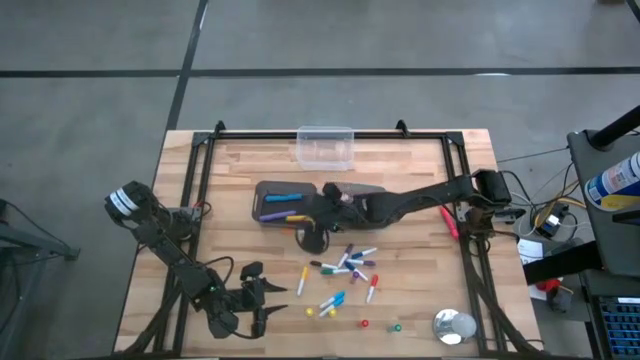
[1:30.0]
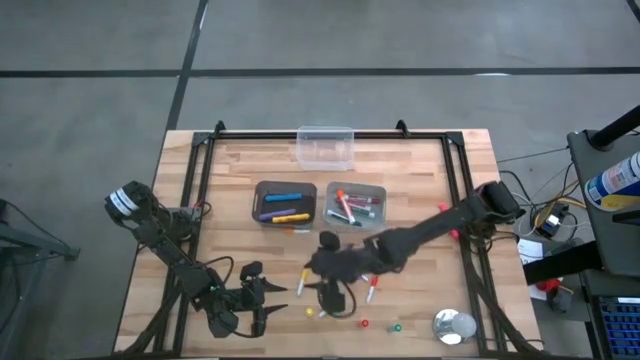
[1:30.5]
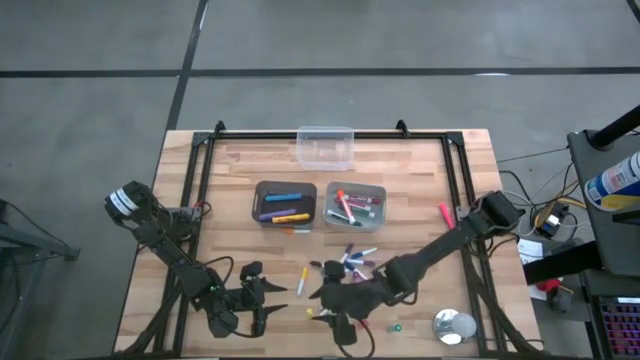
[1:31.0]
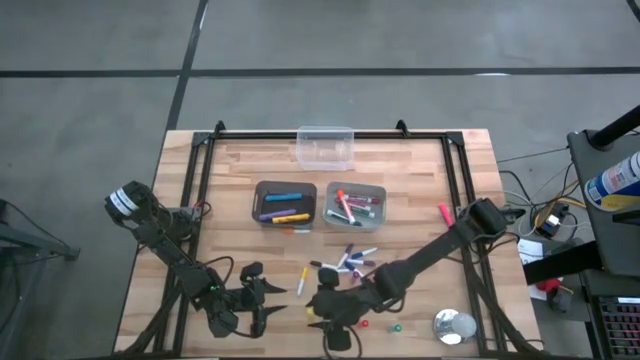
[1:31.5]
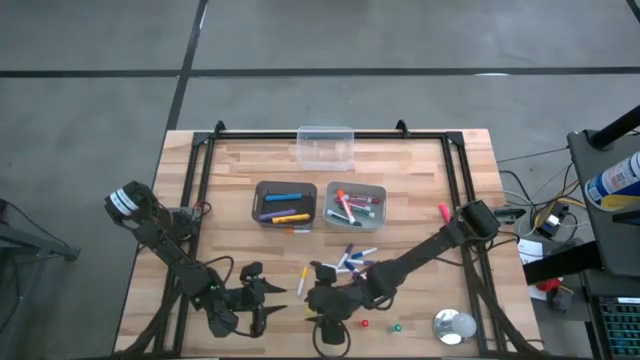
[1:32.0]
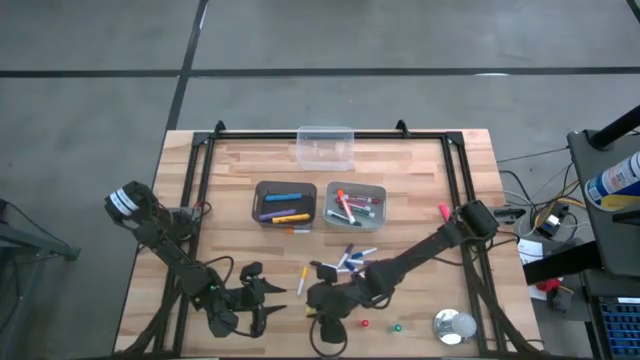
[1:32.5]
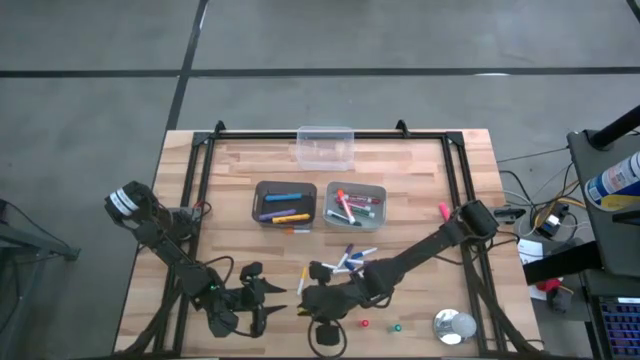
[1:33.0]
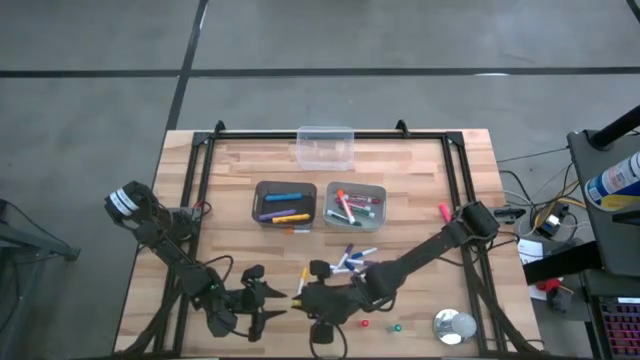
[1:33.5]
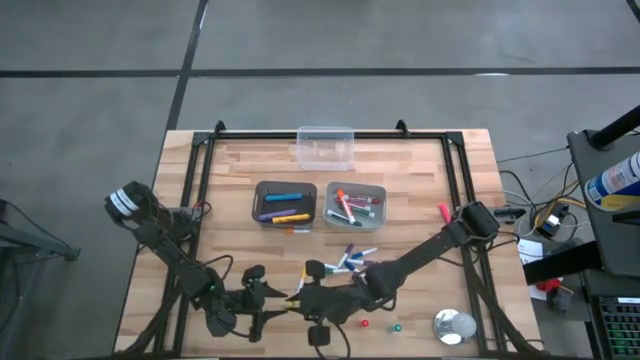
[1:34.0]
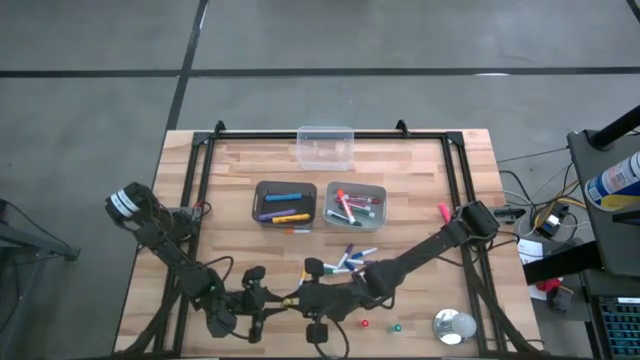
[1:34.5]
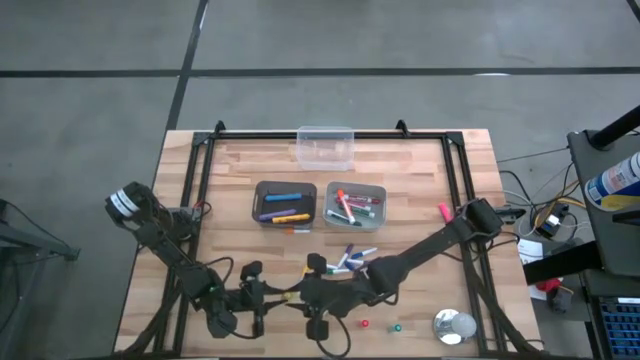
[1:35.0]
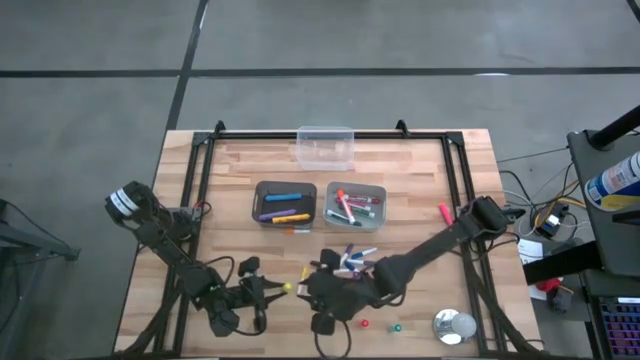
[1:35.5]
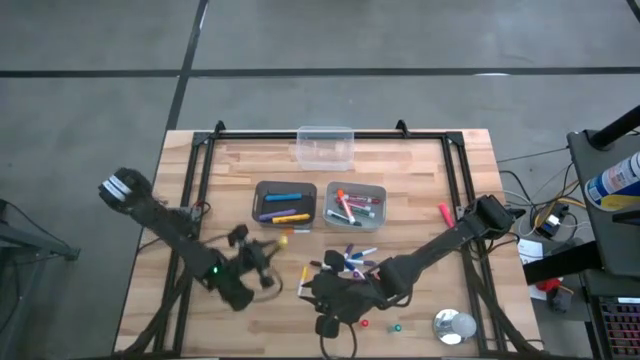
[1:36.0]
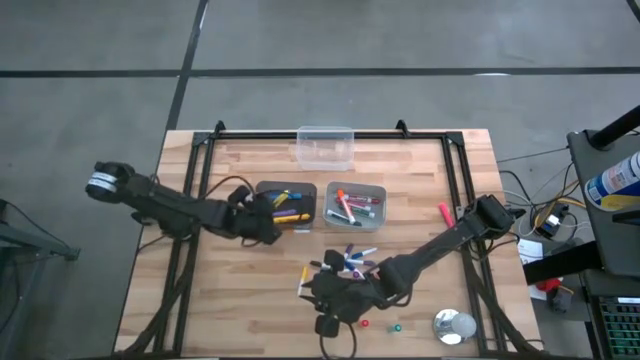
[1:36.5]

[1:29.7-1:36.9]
Task: Pick & Place Markers
Put the left large yellow highlighter pen into the black bin

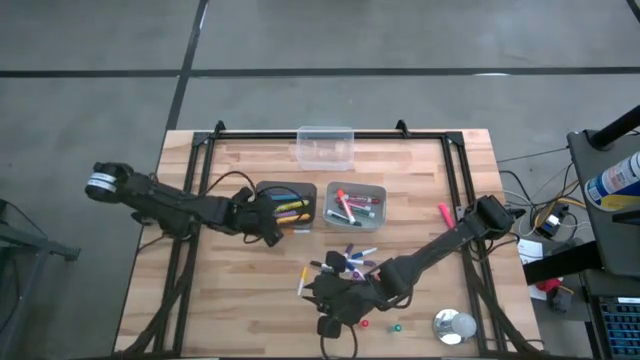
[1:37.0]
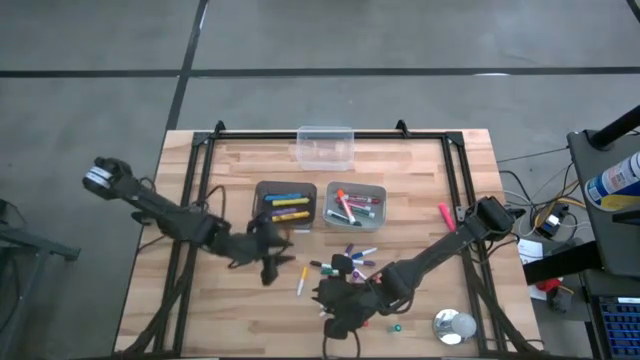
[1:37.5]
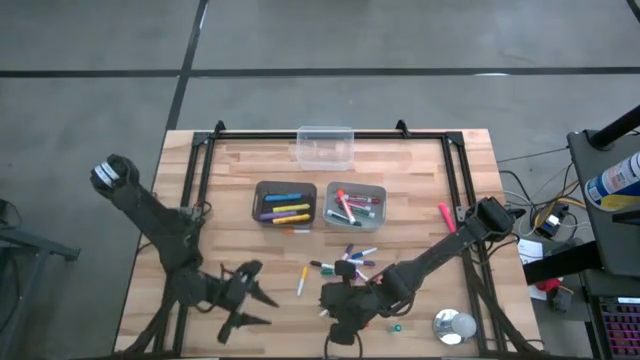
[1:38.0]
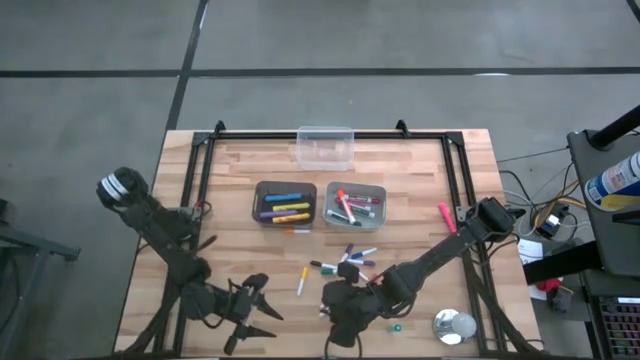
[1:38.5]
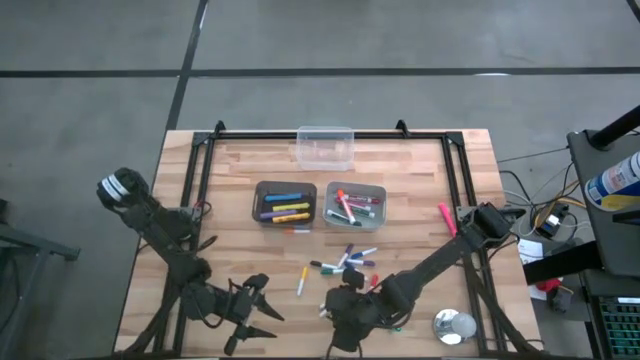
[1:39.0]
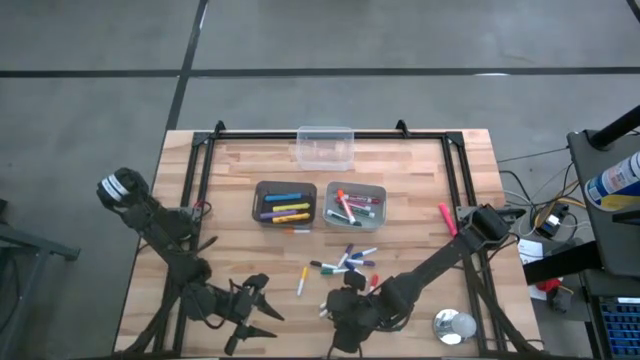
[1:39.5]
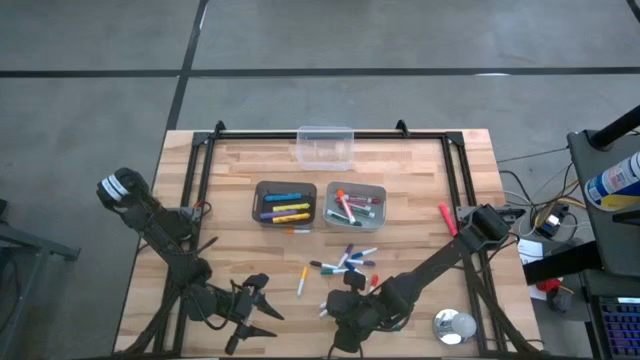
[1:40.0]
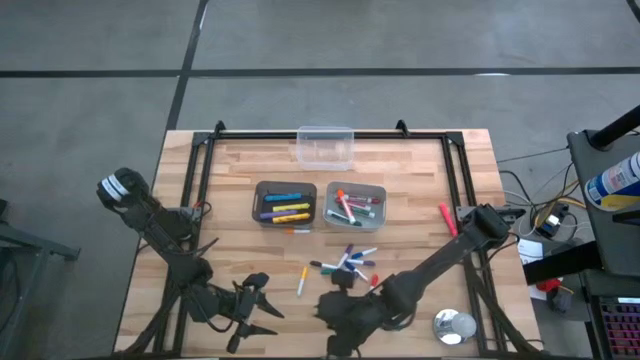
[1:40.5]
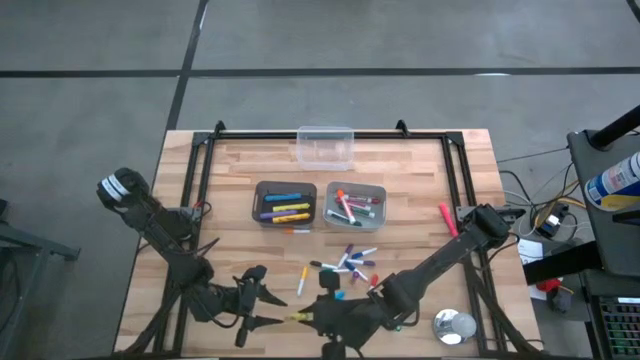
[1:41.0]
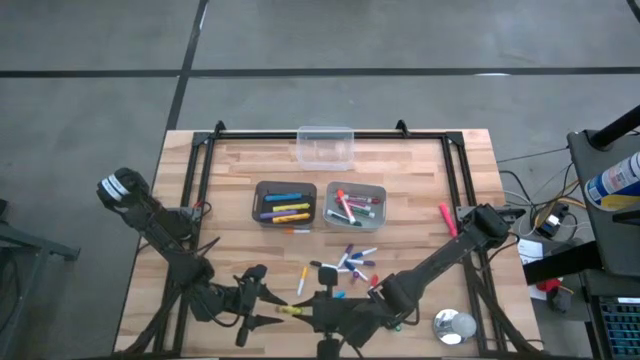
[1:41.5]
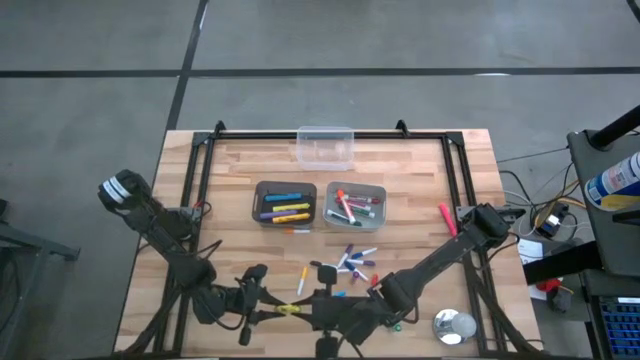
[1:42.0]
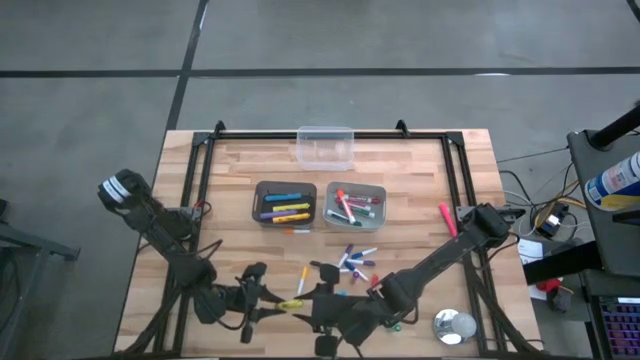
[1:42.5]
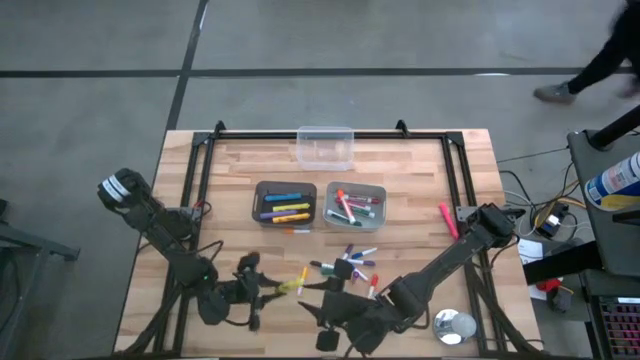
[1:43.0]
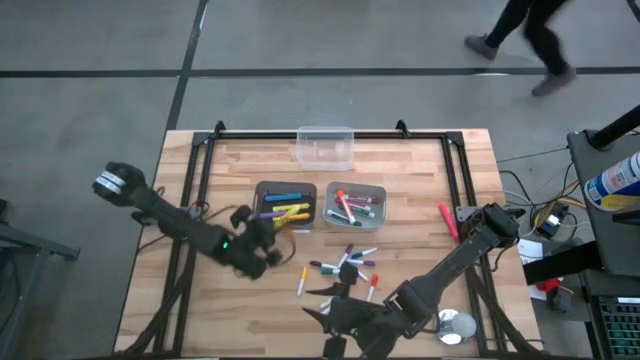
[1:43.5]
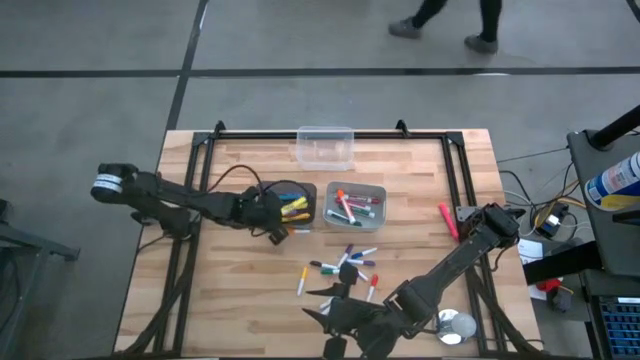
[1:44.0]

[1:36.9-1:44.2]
Put the large yellow highlighter pen into the black bin

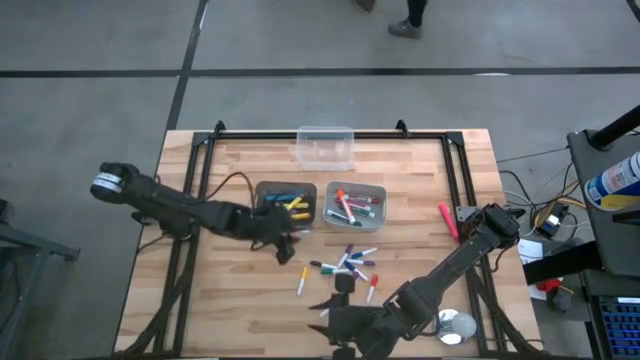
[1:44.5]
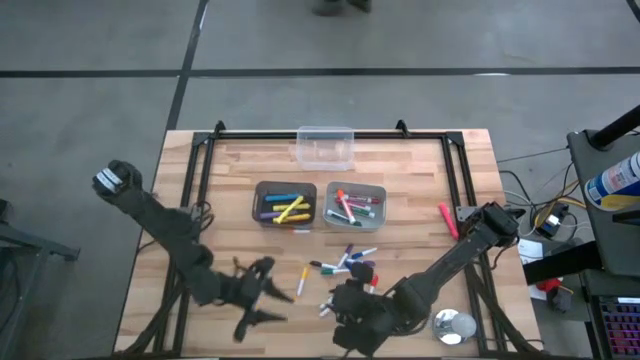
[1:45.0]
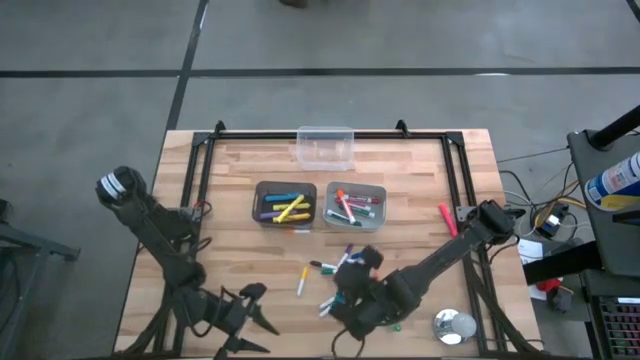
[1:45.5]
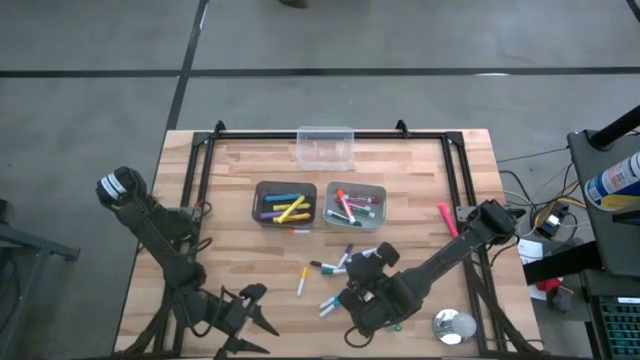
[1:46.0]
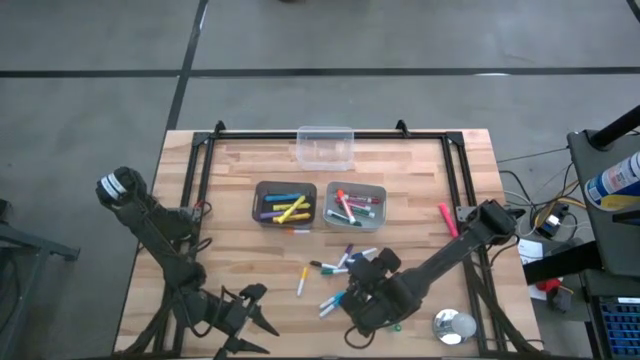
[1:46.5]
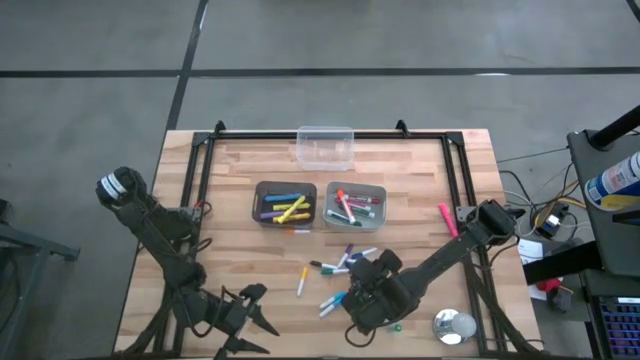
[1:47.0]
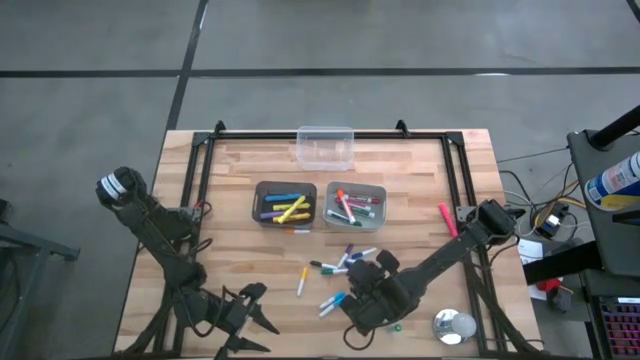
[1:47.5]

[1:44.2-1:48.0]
Put the large dark purple highlighter pen into the black bin

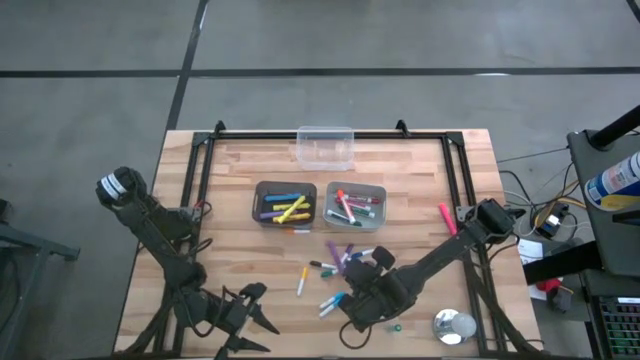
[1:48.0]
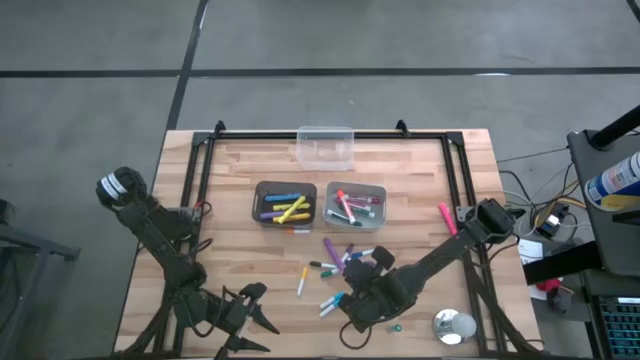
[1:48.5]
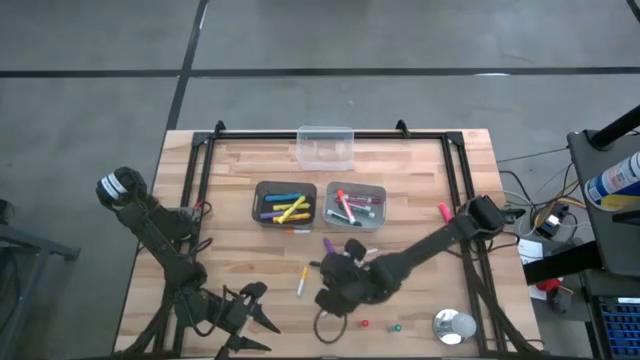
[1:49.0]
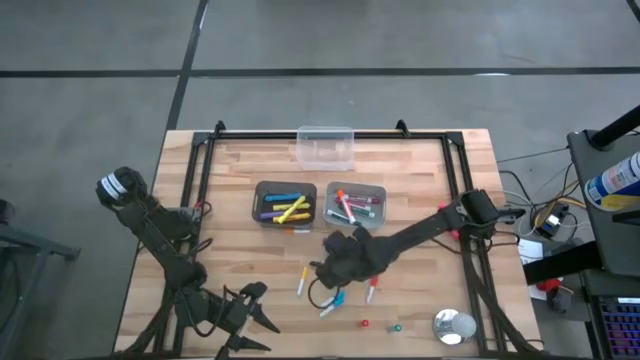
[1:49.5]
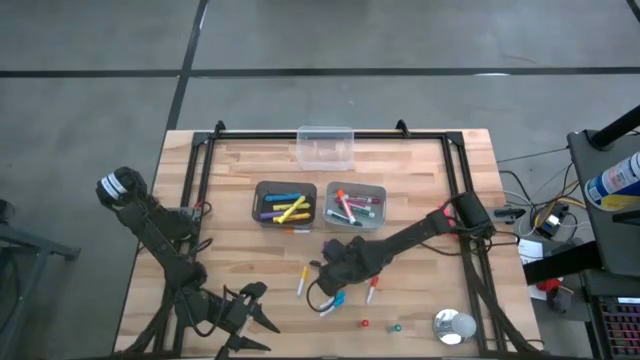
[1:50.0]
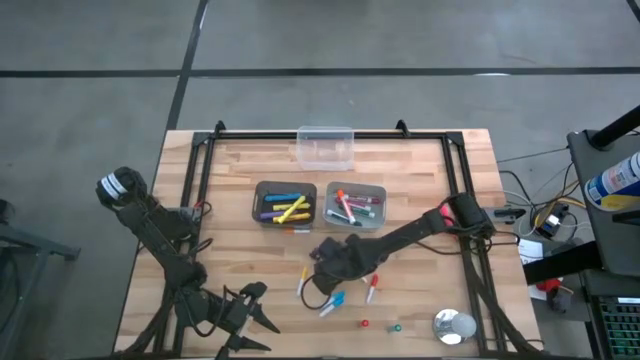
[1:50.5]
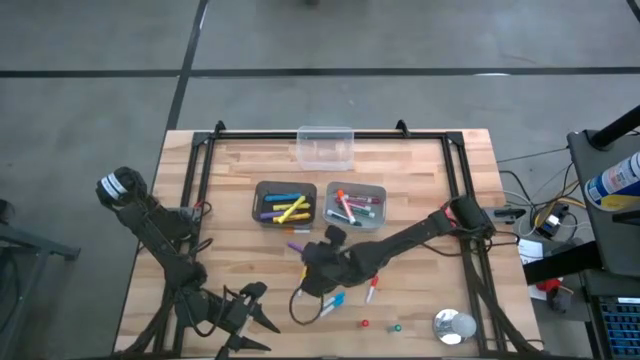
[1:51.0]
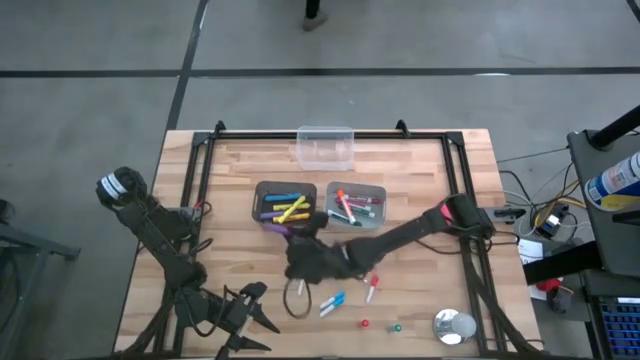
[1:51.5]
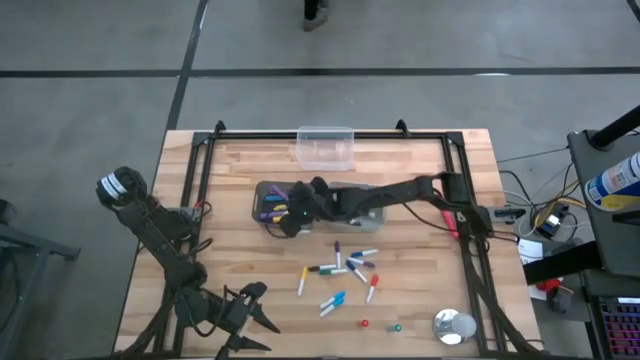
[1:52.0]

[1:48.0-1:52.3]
Put the large dark purple highlighter pen into the black bin
